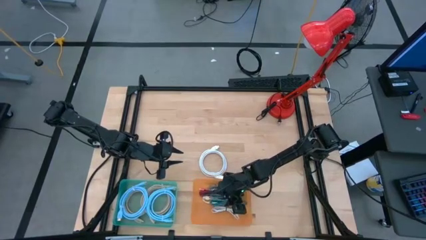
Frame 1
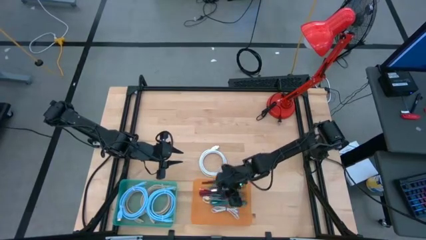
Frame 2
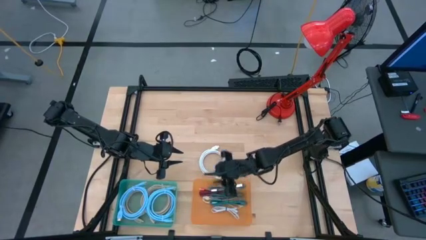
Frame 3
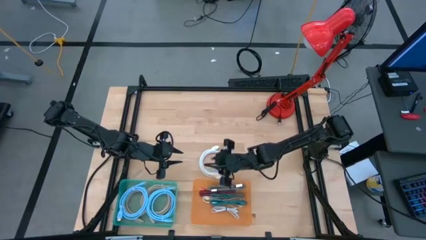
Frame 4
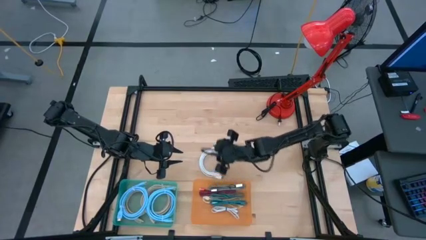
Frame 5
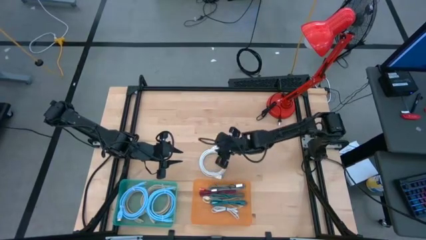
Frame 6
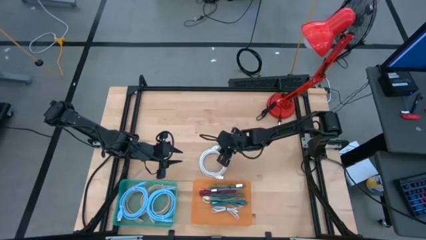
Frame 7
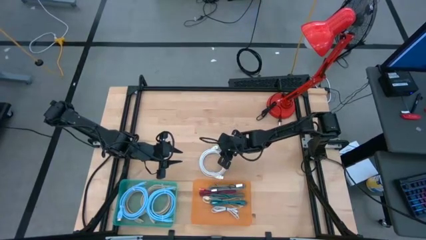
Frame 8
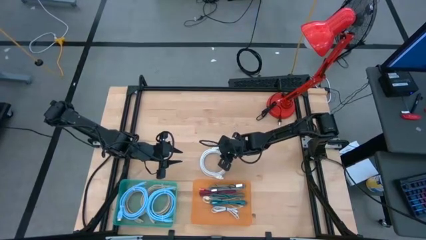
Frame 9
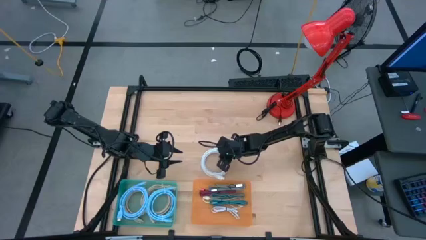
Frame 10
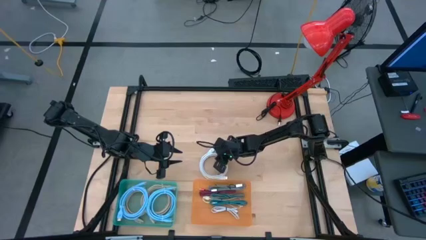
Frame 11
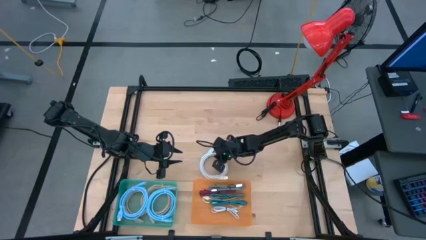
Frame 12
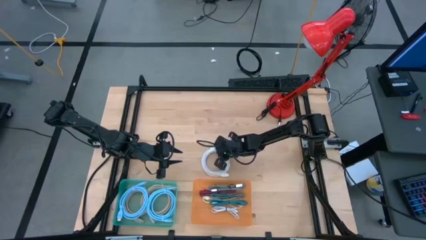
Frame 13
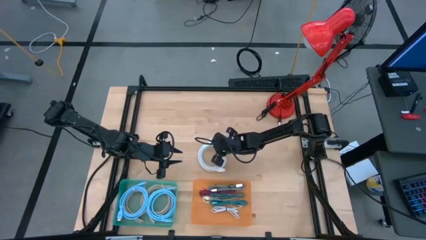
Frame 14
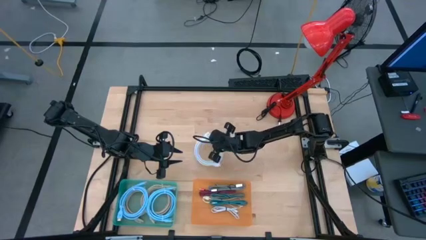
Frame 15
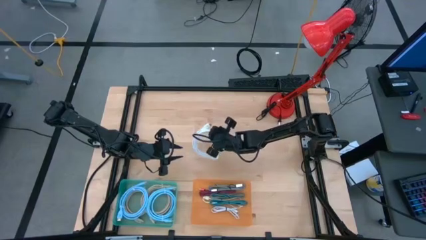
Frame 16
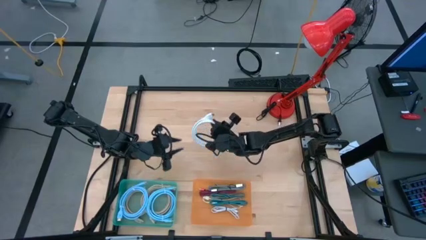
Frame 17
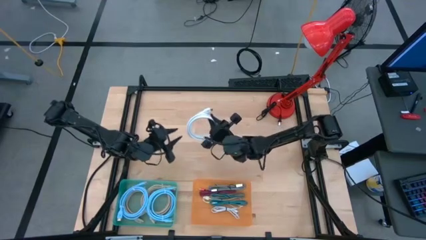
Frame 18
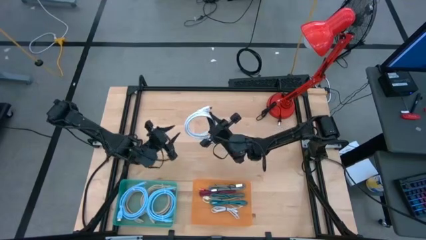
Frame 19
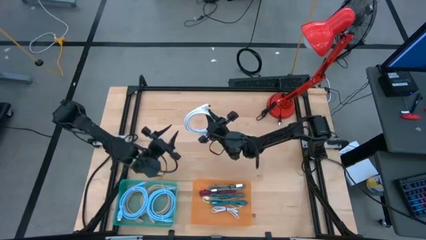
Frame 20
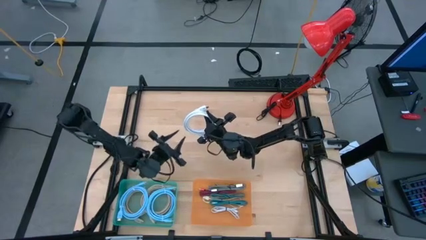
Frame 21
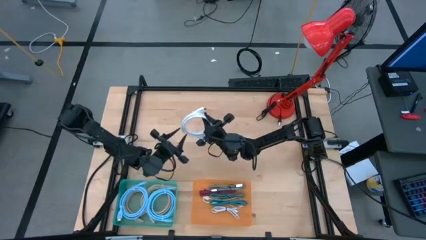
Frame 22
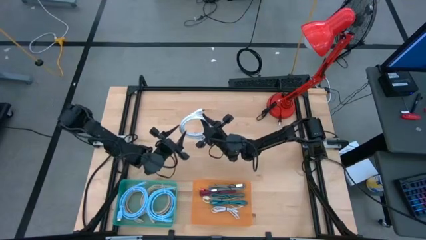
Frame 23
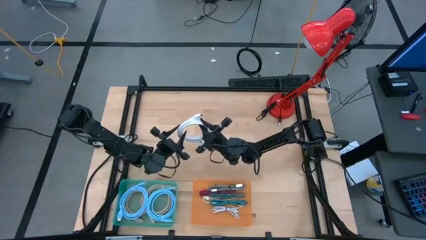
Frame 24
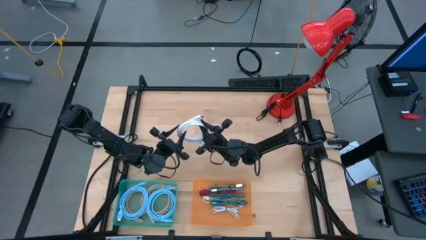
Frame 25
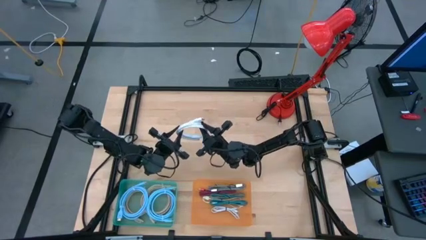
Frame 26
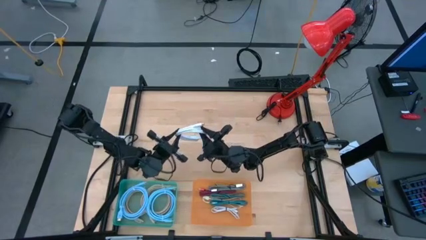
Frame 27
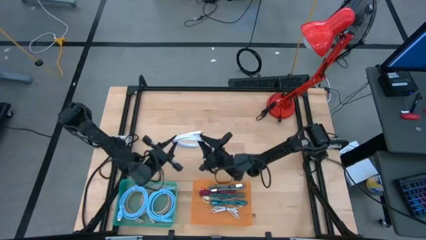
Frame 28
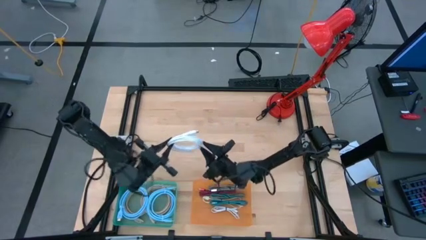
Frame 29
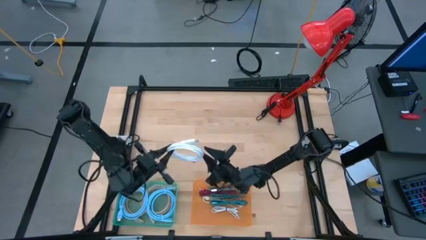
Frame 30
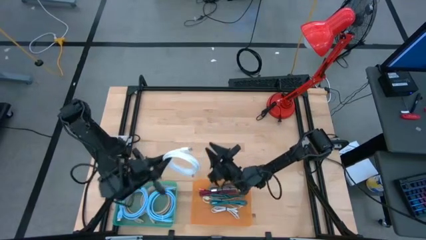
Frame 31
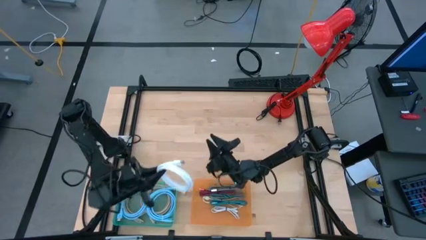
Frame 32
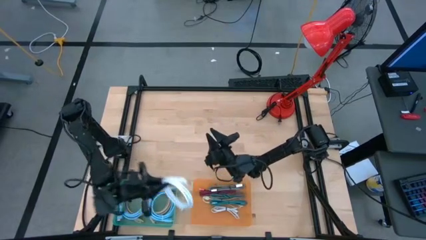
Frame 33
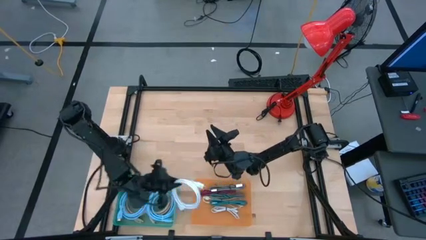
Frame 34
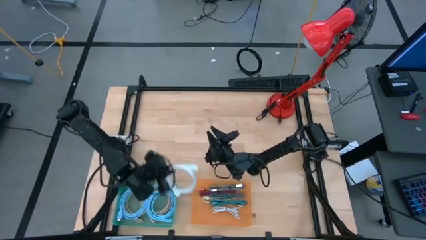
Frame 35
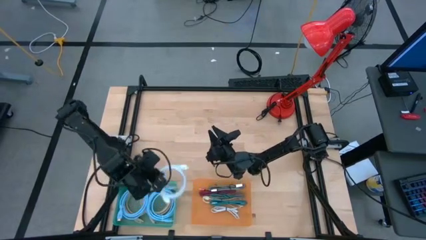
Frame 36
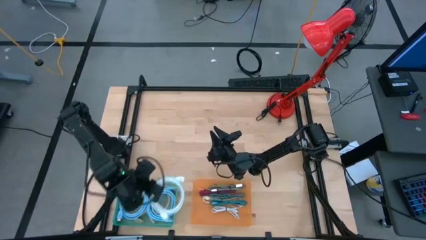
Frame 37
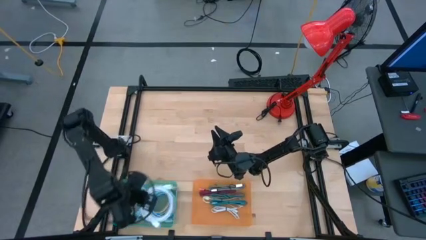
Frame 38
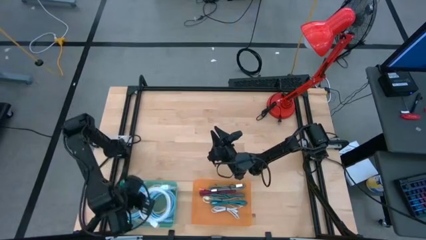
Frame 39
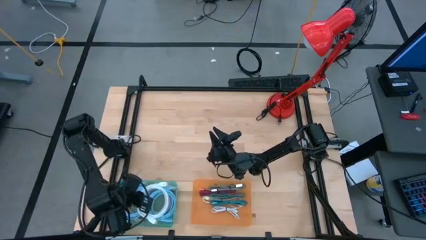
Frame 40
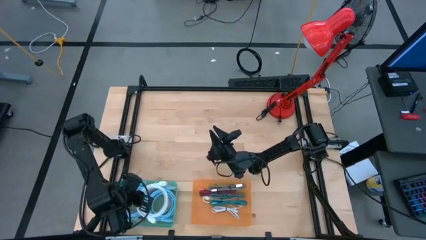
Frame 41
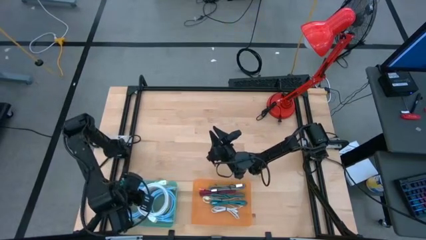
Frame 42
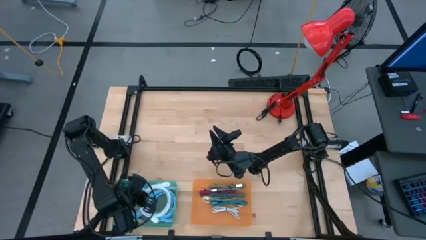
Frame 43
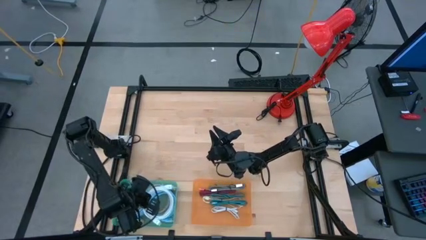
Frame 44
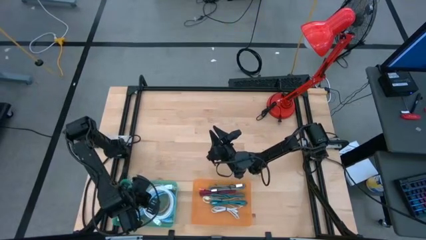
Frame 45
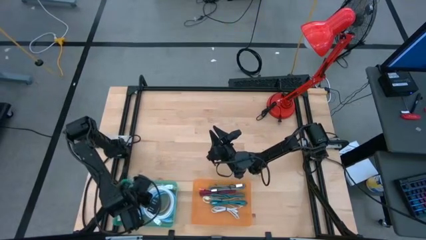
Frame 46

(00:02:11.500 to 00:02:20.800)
Task: Pick & Place USB Port
Put the white HDMI cable into the green bin

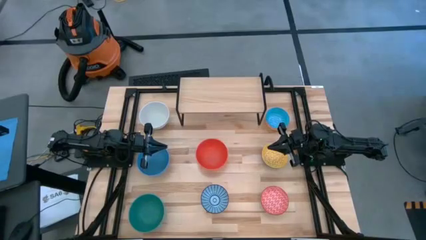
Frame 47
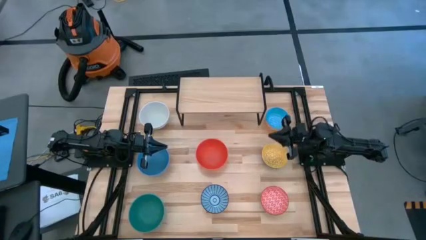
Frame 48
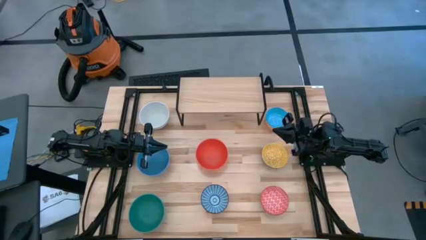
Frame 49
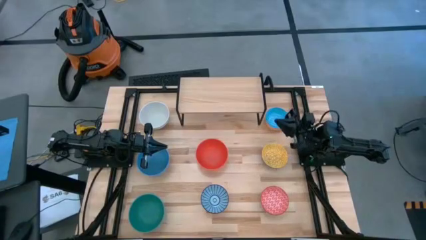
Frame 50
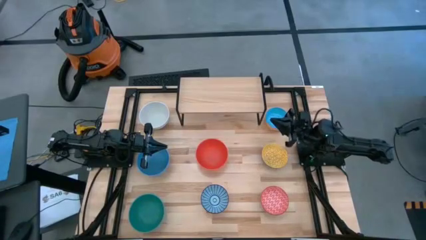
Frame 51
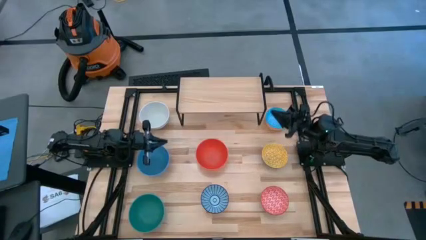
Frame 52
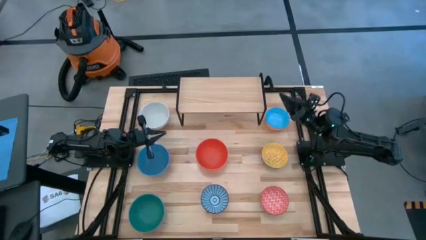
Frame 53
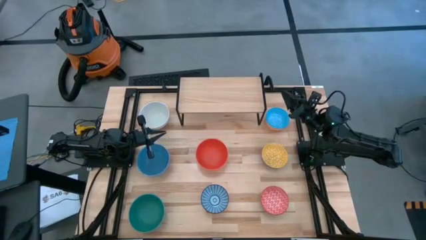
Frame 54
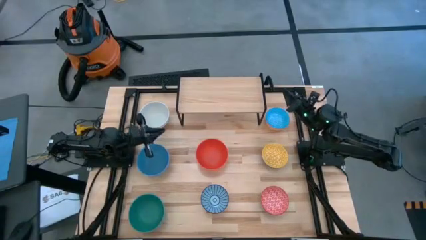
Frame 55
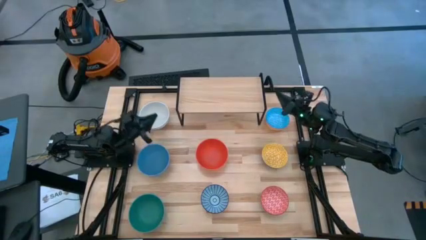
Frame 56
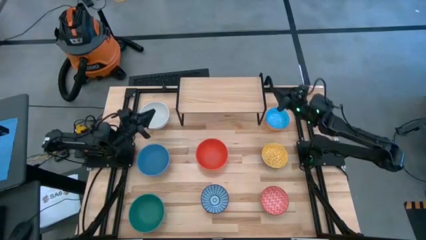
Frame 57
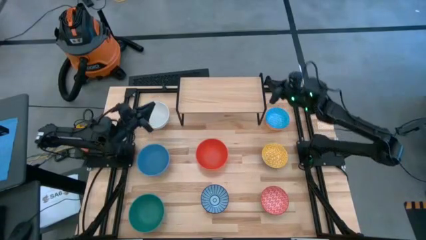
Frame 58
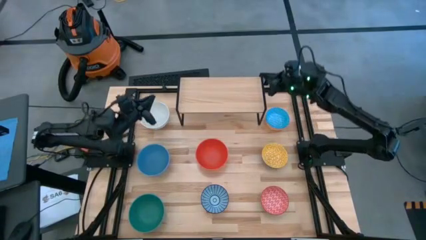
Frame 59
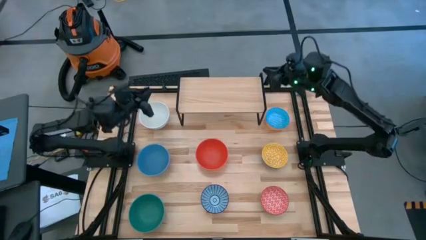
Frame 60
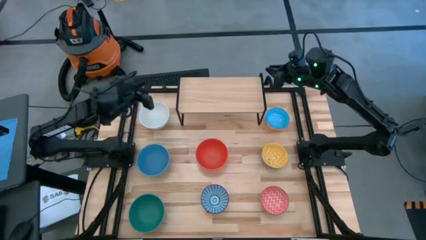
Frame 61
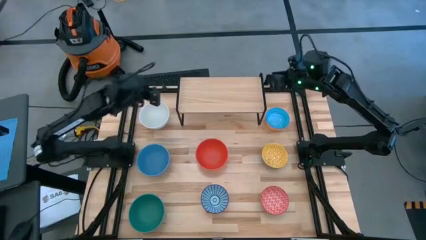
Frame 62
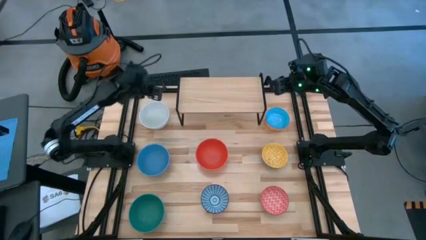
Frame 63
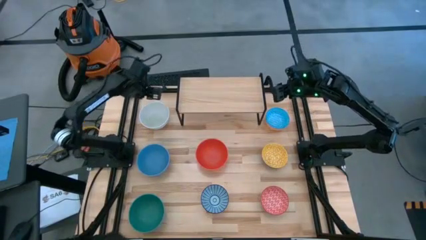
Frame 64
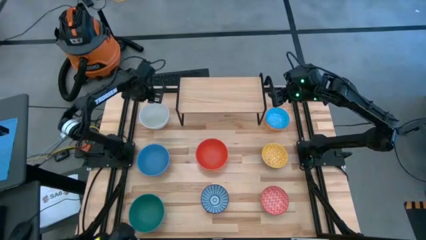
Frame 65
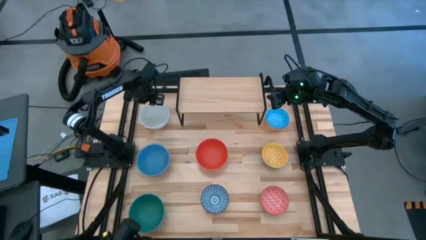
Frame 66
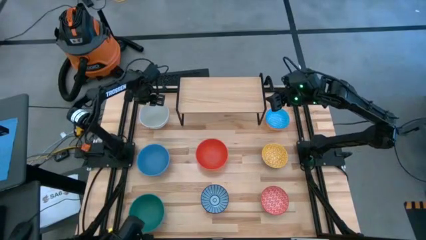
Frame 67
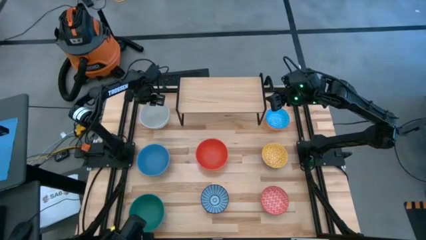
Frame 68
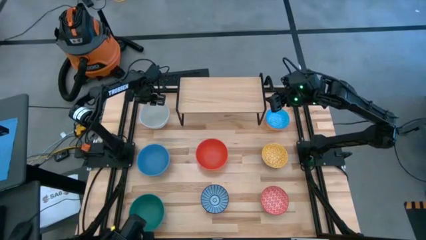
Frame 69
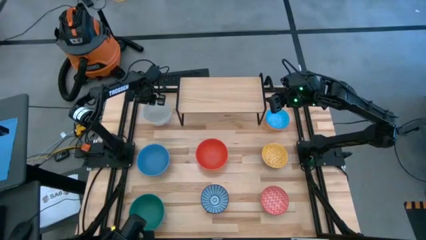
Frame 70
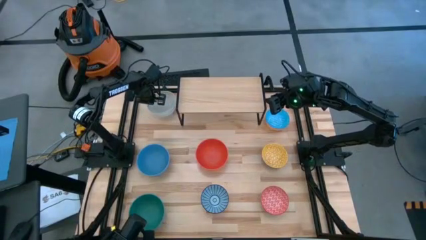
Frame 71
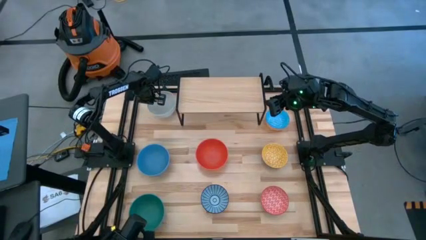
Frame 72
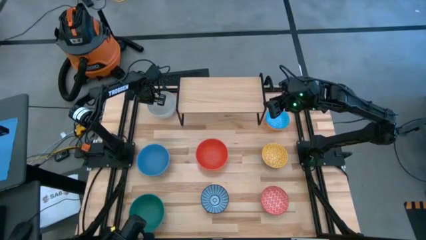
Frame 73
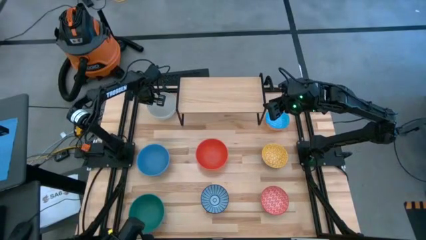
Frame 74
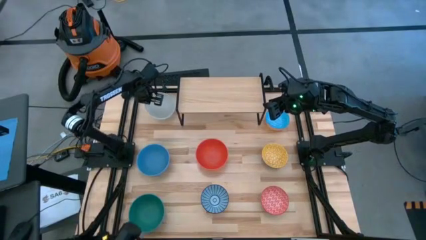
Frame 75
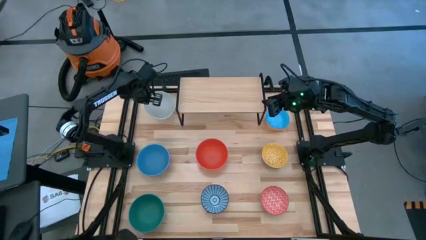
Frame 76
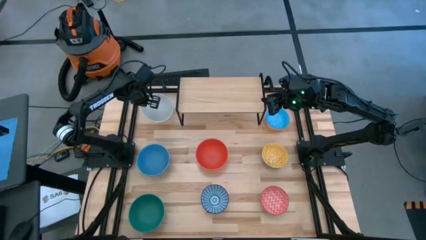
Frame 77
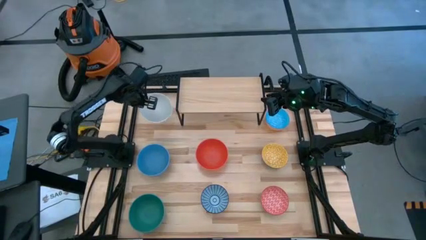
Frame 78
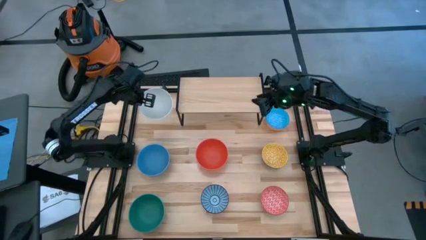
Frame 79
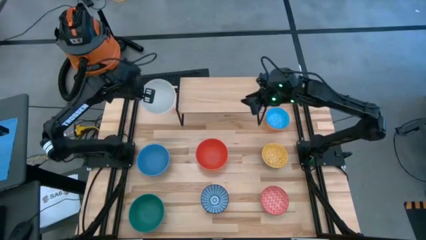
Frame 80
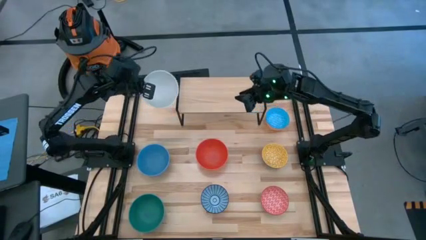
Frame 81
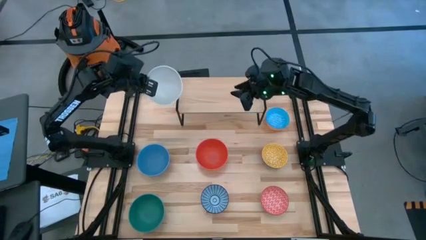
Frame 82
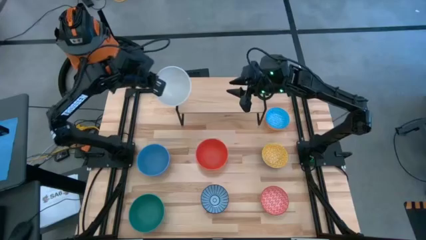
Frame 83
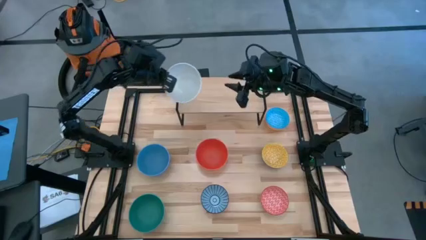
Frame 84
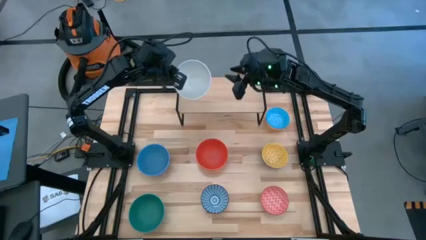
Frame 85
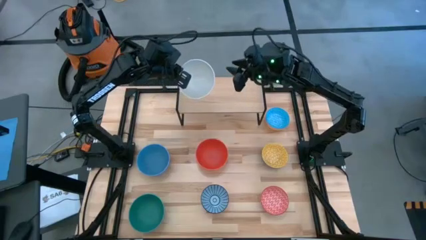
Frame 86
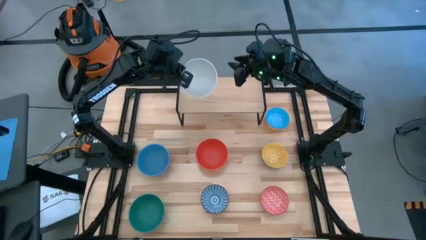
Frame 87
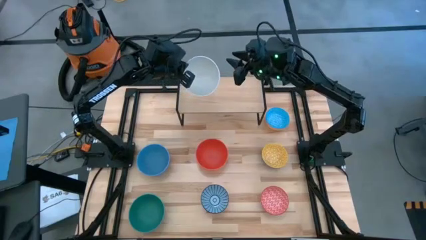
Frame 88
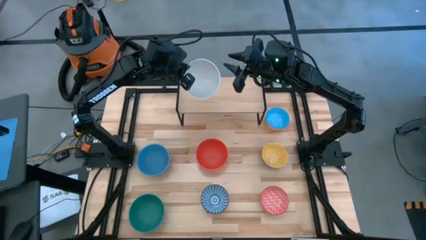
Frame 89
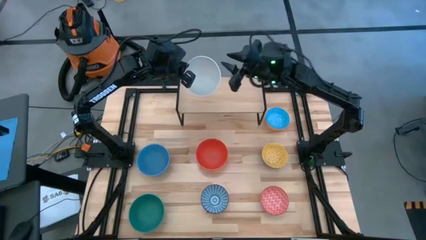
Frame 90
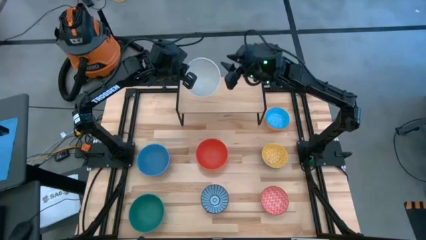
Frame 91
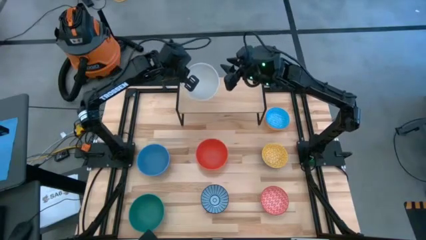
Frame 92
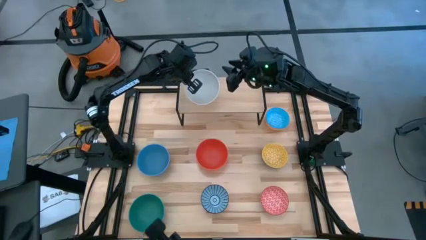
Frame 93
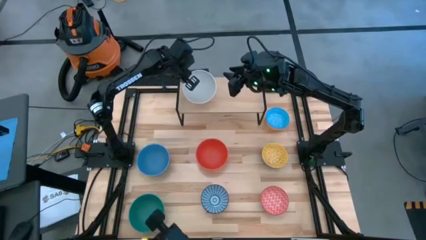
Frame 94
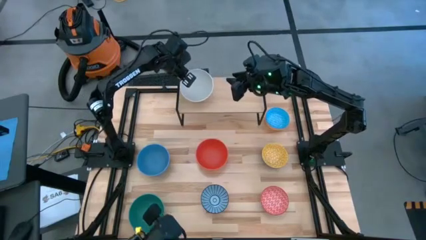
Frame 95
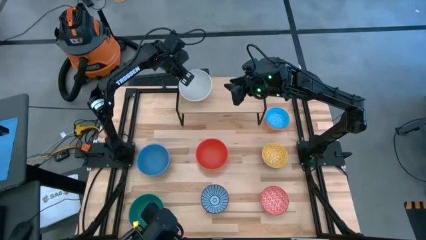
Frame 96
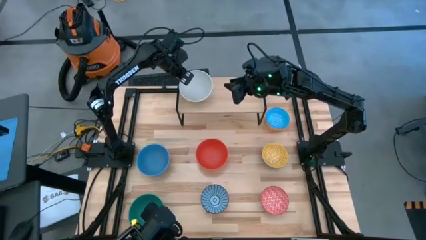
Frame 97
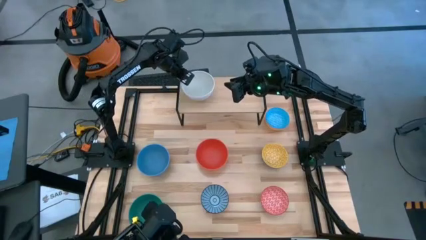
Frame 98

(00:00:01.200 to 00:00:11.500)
Task: Place and stack bowls onto a shelf
Put the white bowl on the shelf
